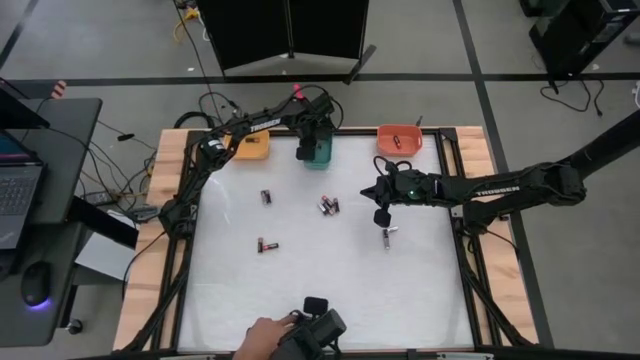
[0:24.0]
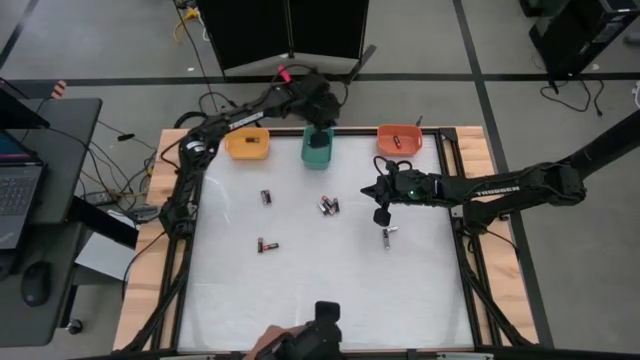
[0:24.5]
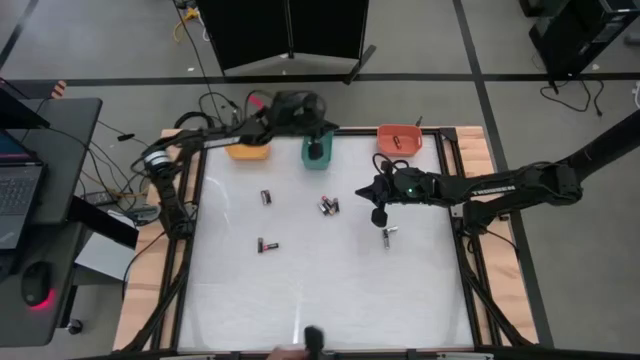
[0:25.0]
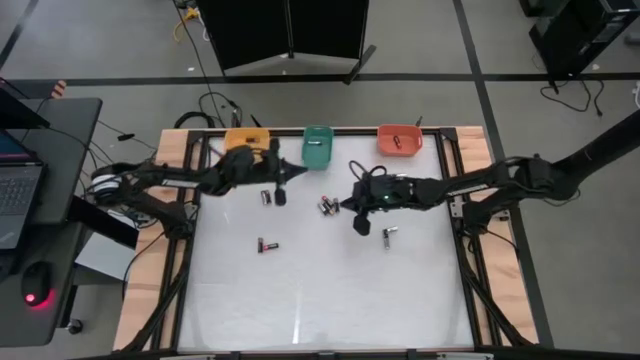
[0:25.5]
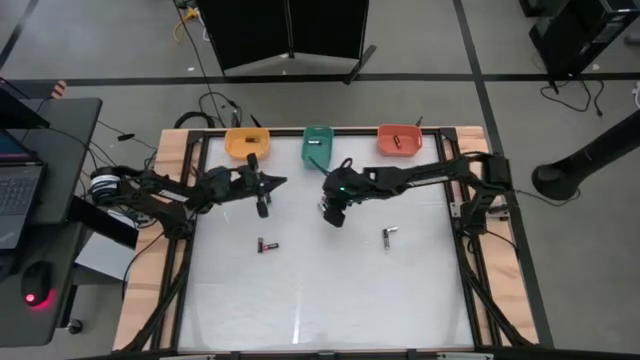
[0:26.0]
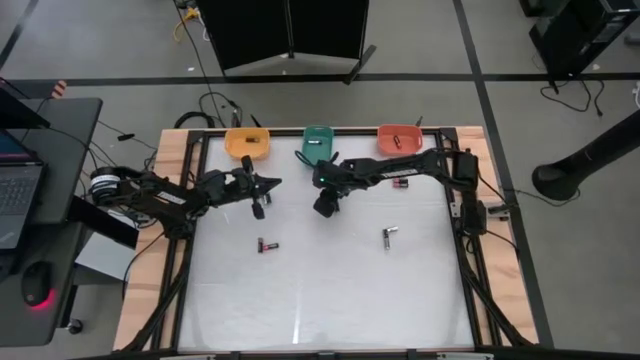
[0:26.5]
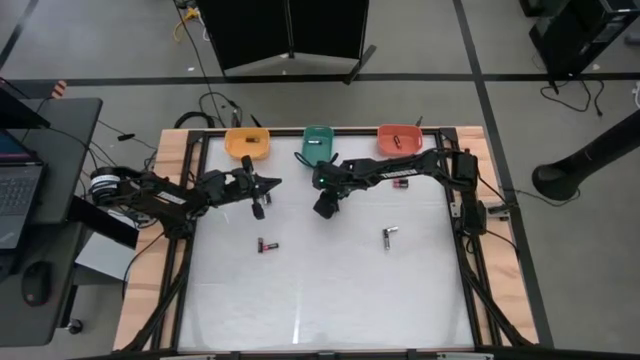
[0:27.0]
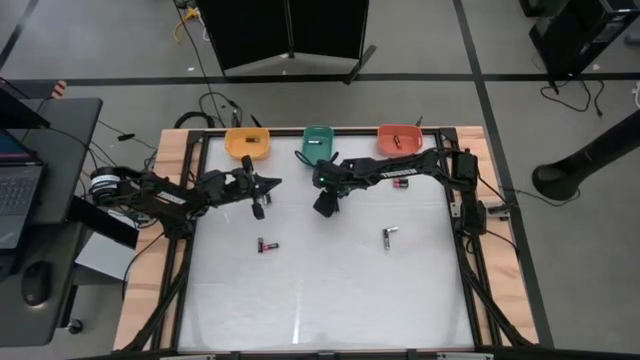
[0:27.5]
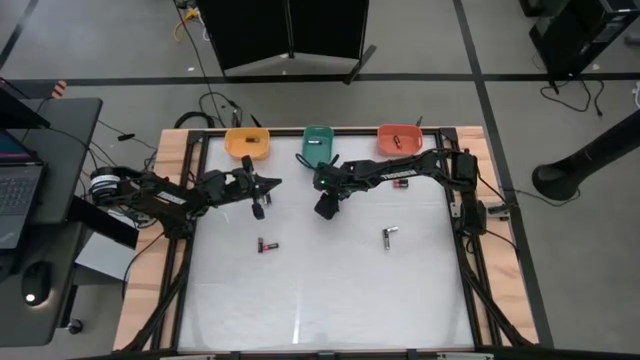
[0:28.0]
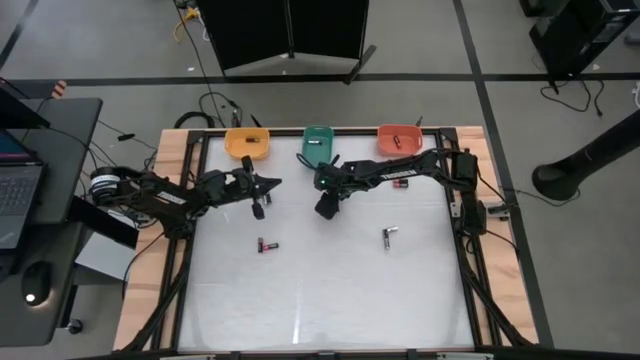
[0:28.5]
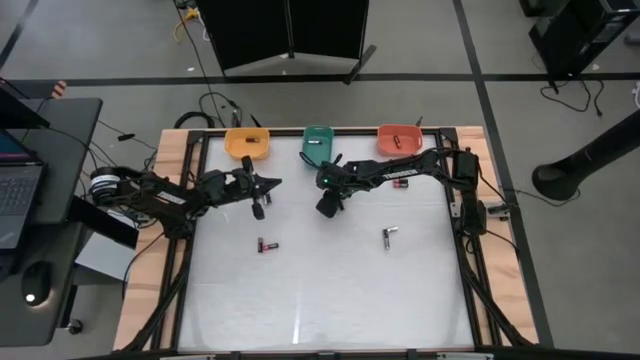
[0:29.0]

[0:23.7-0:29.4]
Task: Sort batteries
Put the red battery into the orange bin

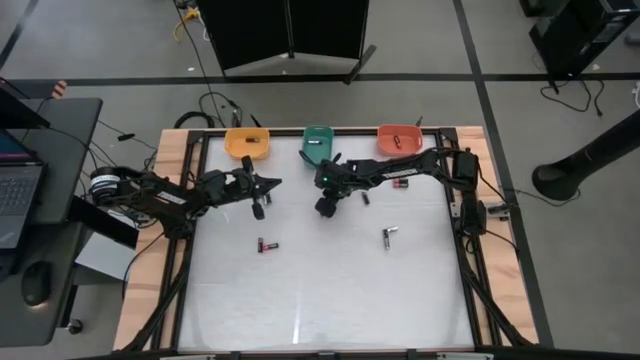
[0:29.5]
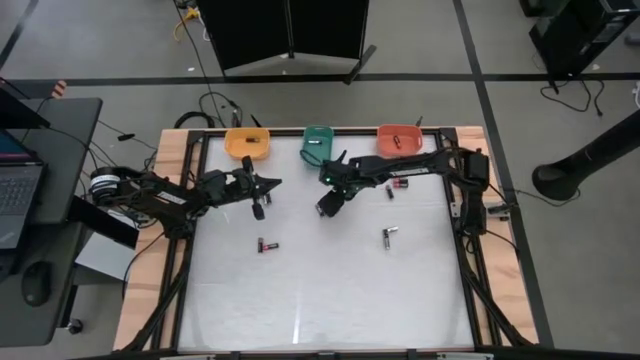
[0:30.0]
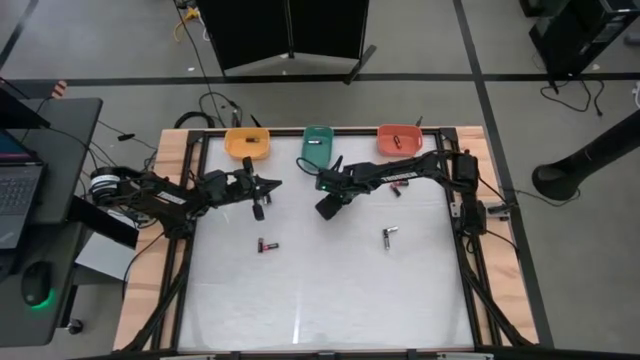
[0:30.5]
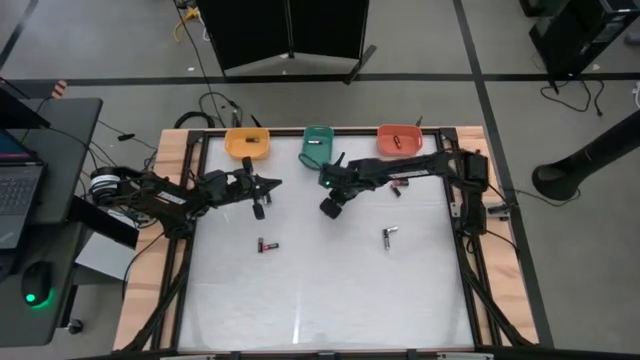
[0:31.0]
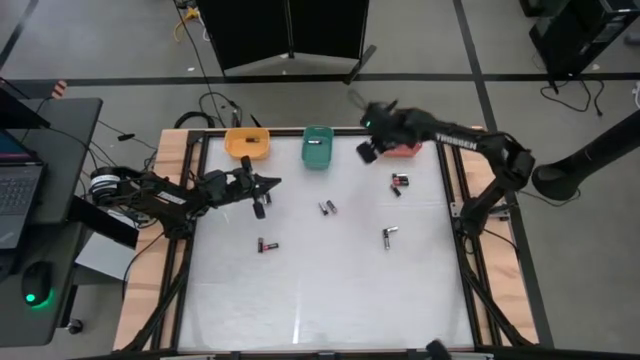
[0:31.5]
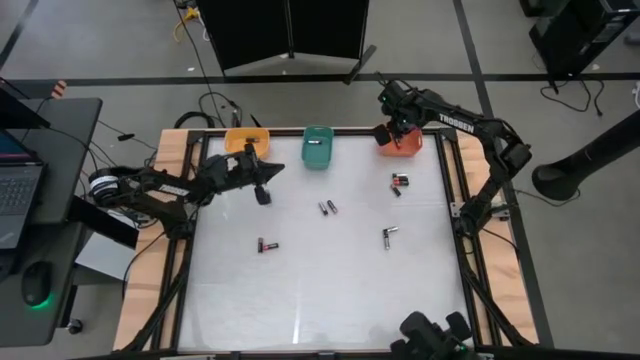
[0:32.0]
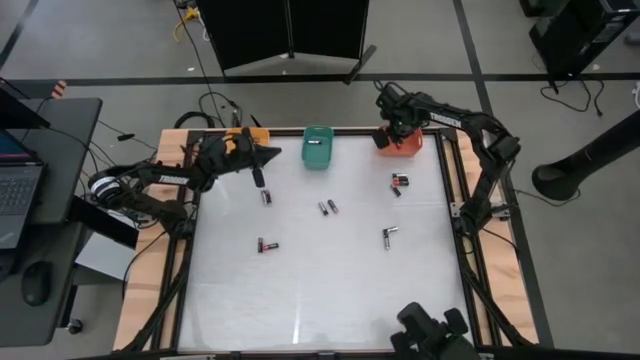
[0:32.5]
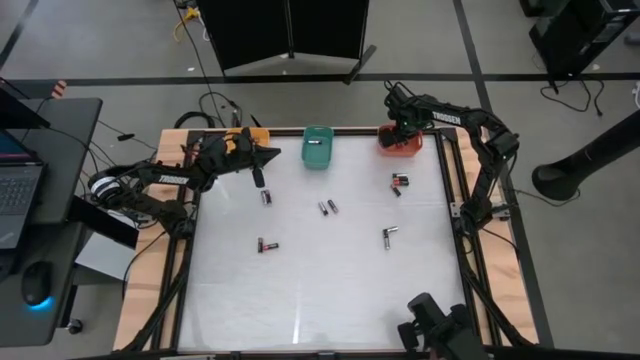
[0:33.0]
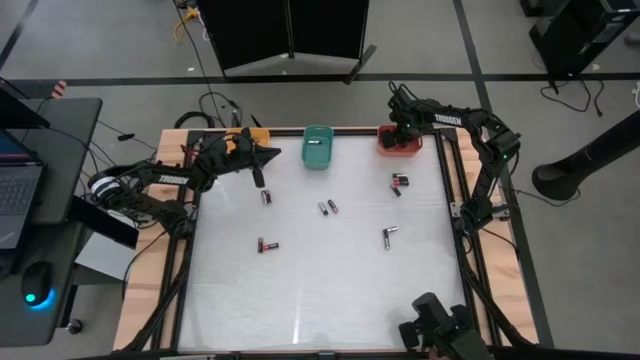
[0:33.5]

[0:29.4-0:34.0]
Put the red battery into the orange bin

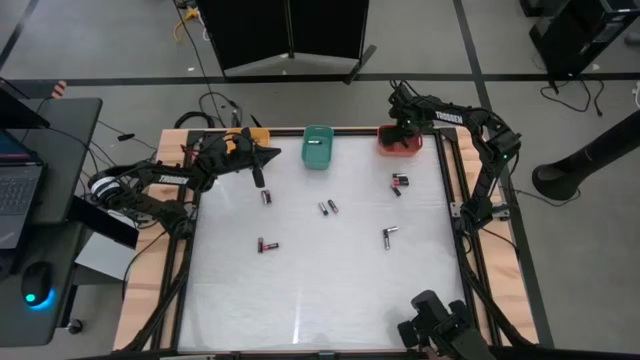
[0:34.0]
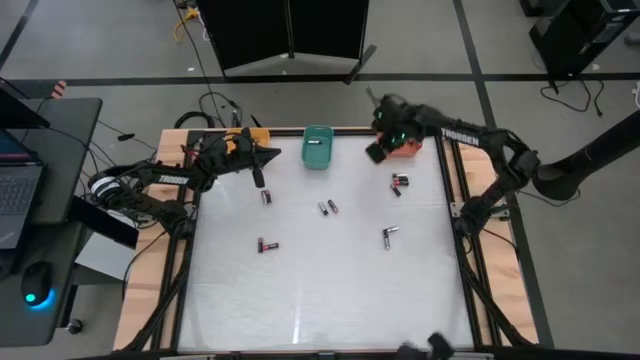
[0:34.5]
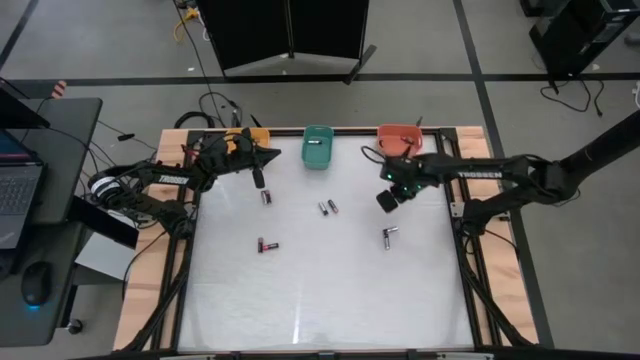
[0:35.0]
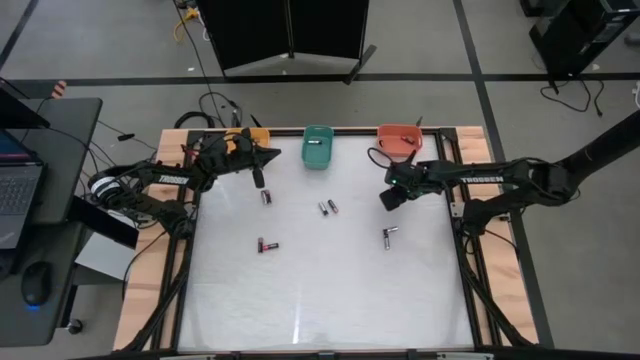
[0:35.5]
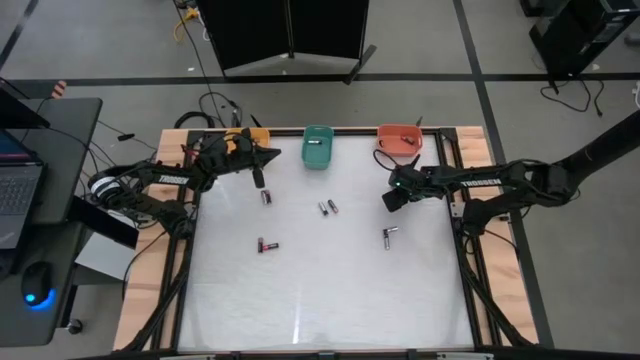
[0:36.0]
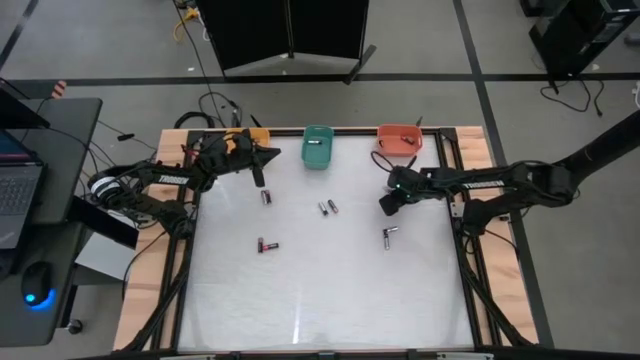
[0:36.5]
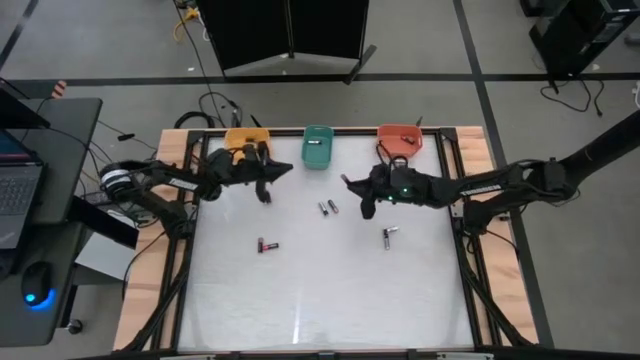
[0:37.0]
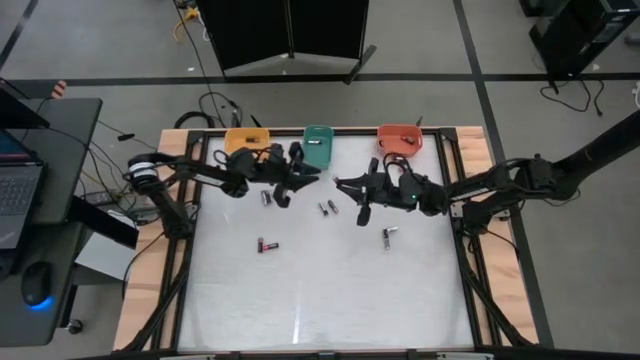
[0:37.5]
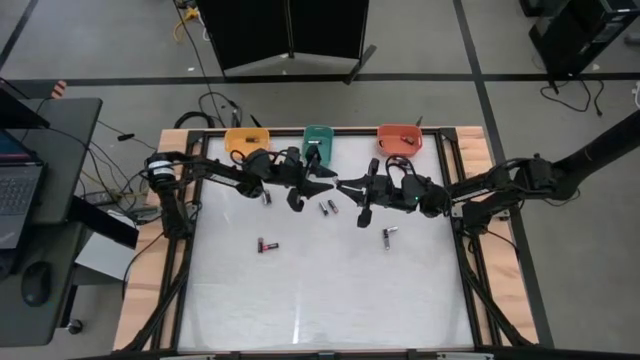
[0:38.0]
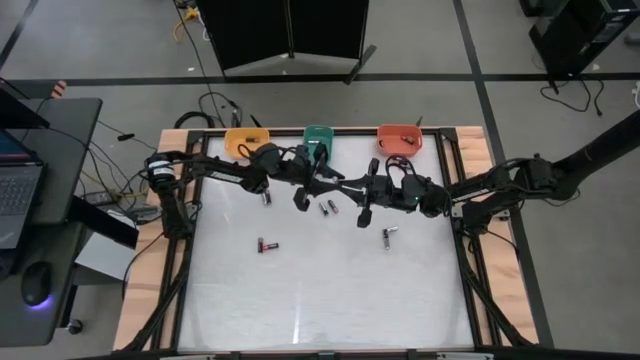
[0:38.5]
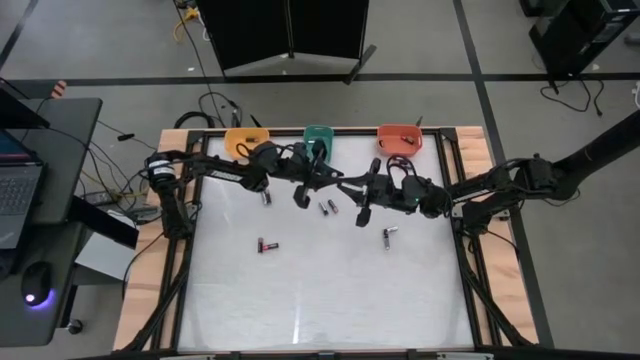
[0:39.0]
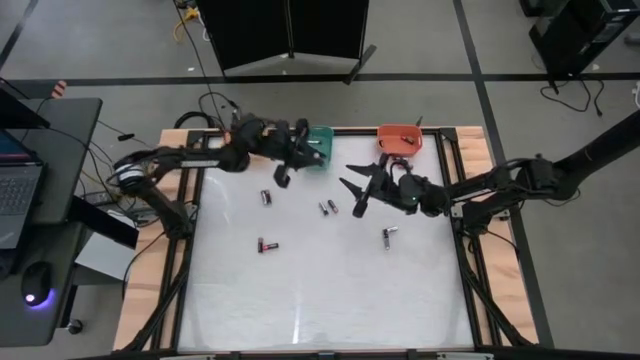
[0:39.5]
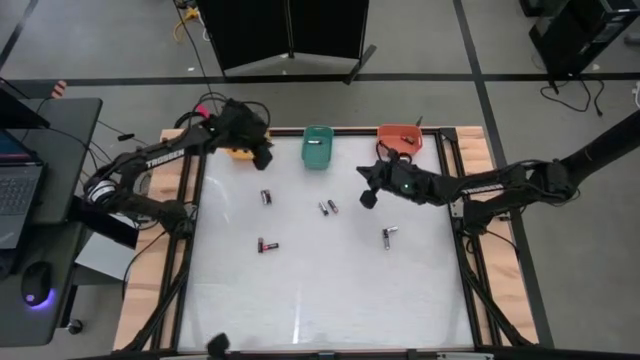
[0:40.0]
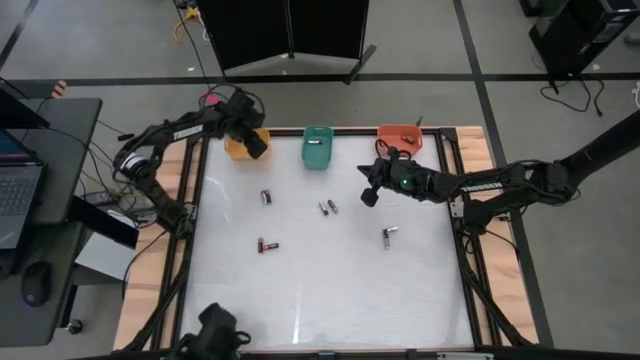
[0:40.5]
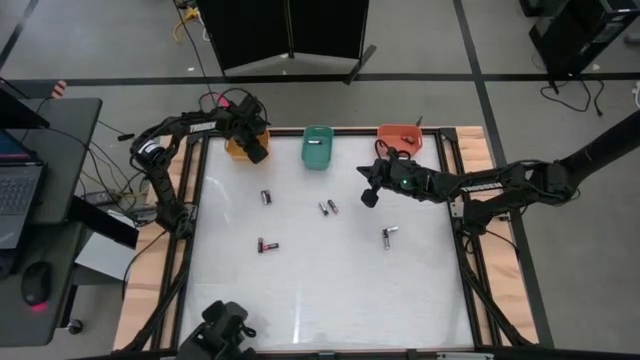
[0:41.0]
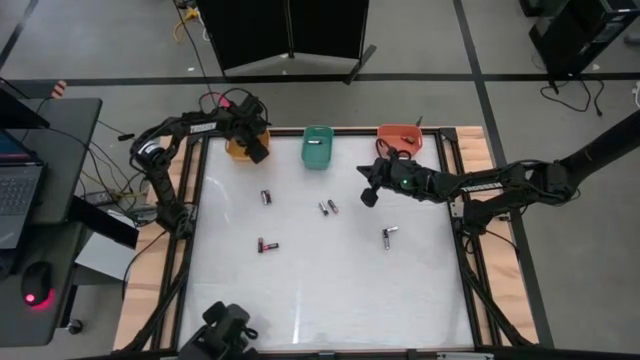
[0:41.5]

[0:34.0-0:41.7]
Put the black battery into the yellow bin

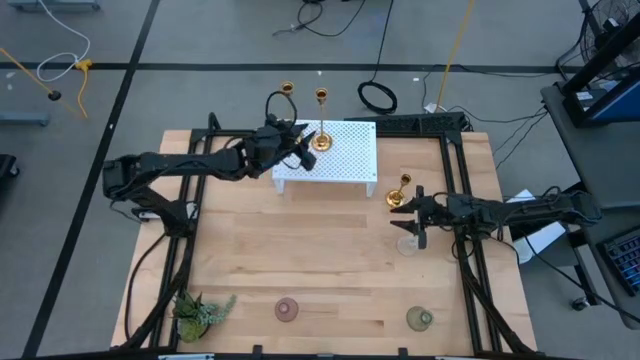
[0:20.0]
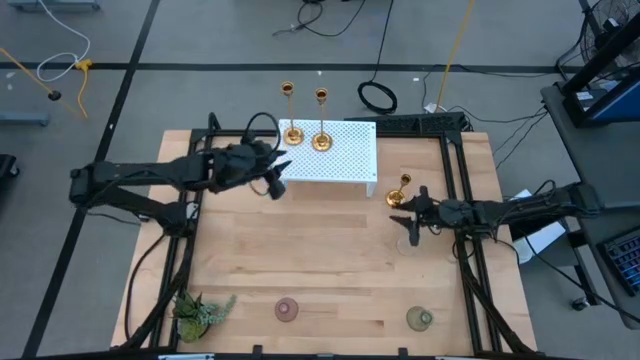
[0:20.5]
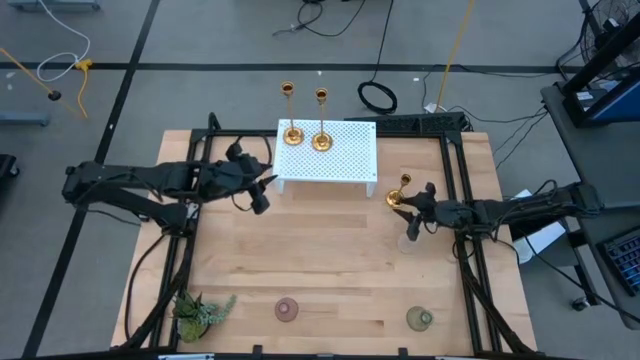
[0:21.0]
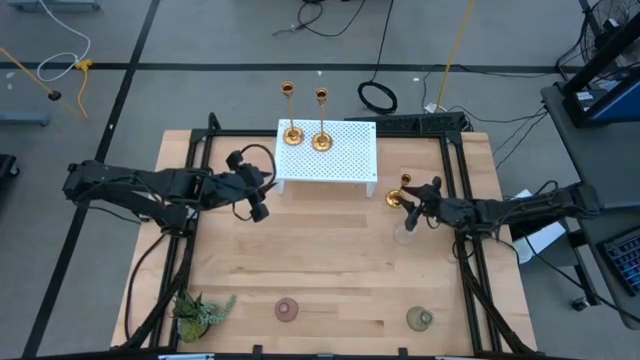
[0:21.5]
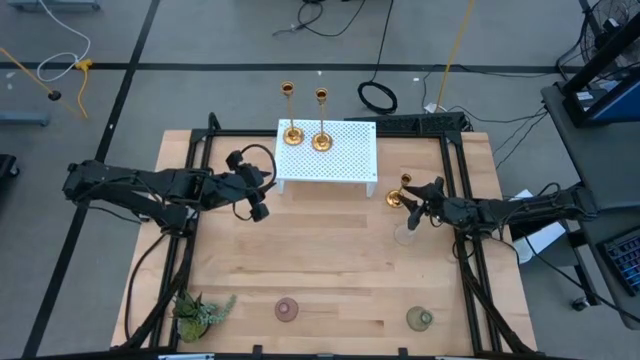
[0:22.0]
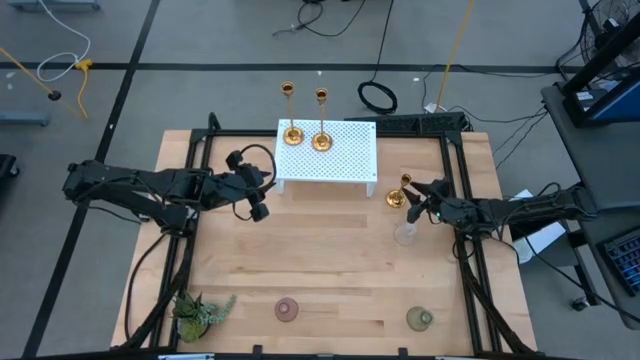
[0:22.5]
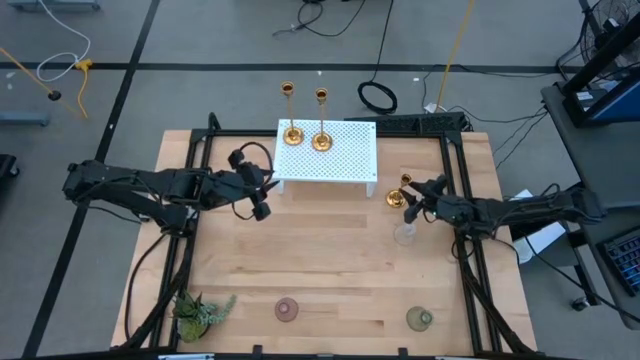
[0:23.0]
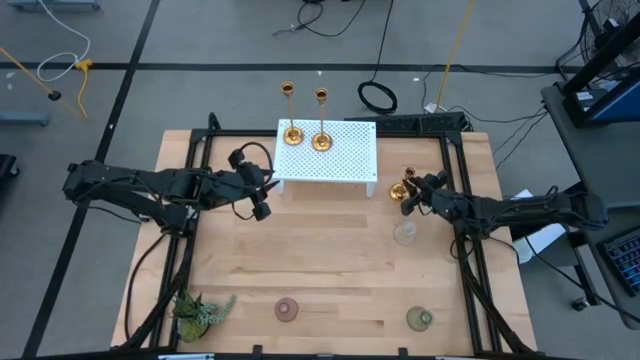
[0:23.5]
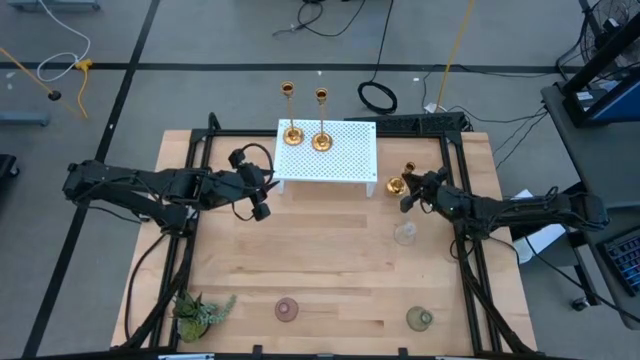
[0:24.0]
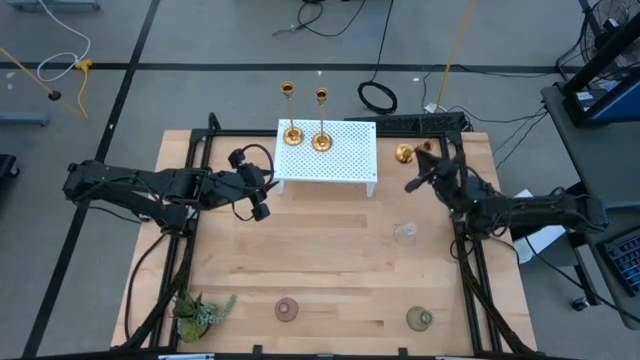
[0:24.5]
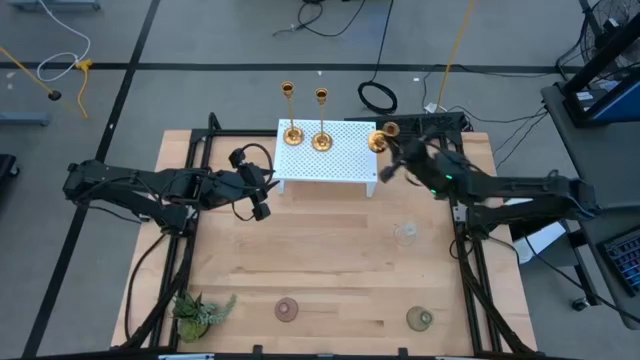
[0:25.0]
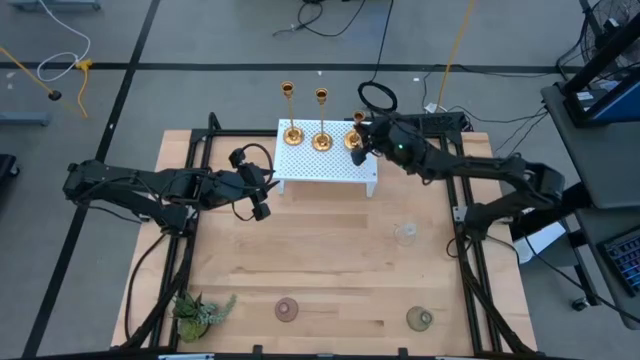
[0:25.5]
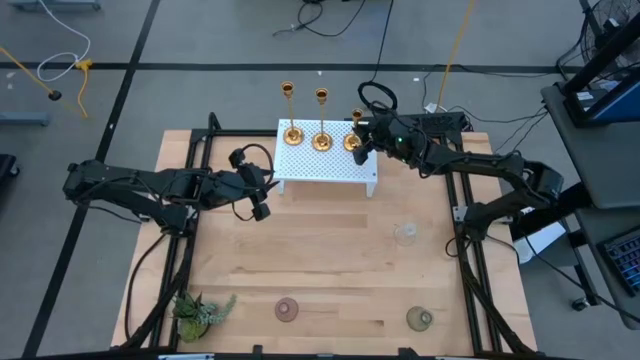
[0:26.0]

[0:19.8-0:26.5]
Task: Pick & Place candle stick holders
Put the middle right golden candle holder on the shelf
